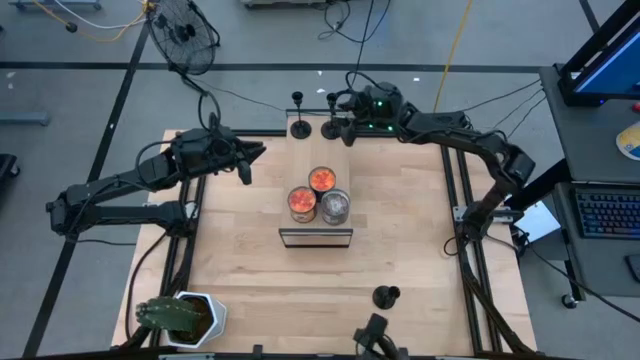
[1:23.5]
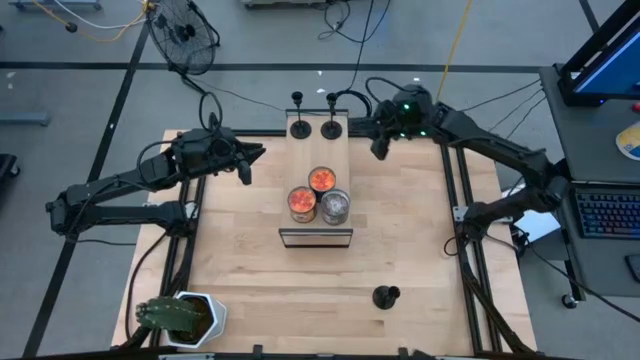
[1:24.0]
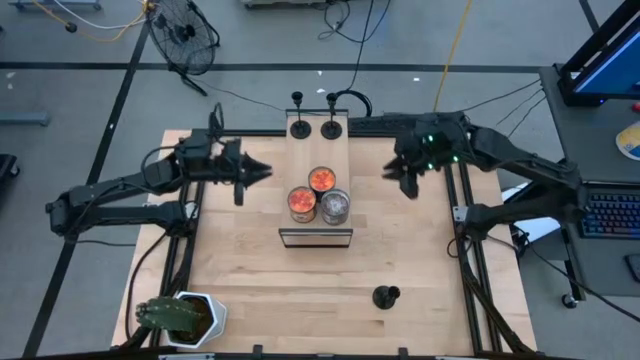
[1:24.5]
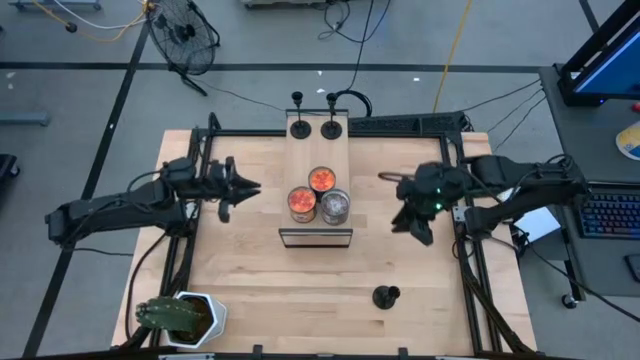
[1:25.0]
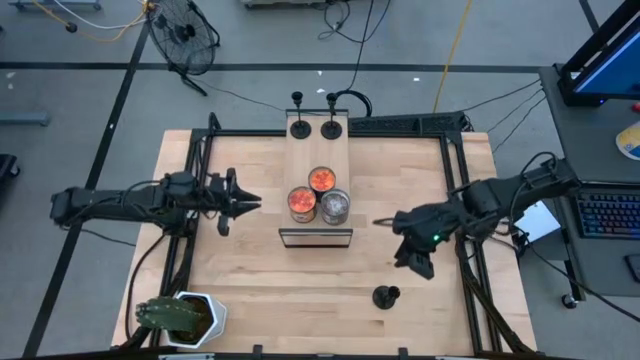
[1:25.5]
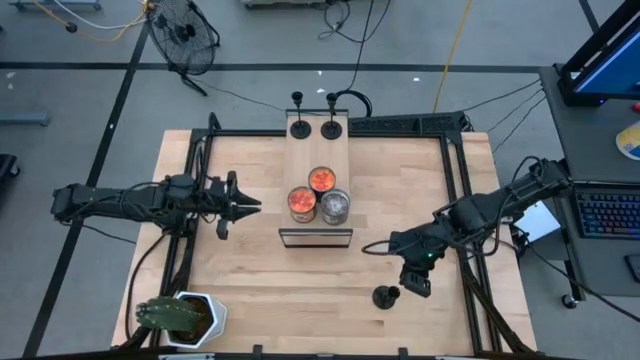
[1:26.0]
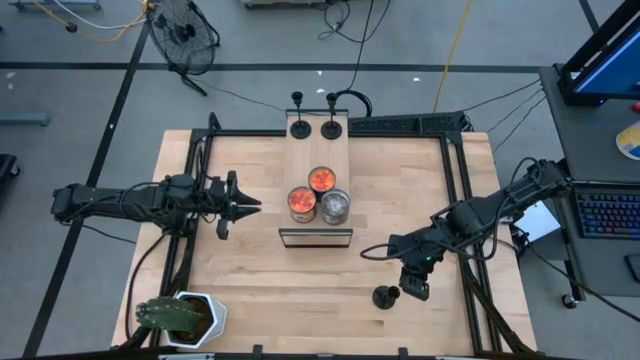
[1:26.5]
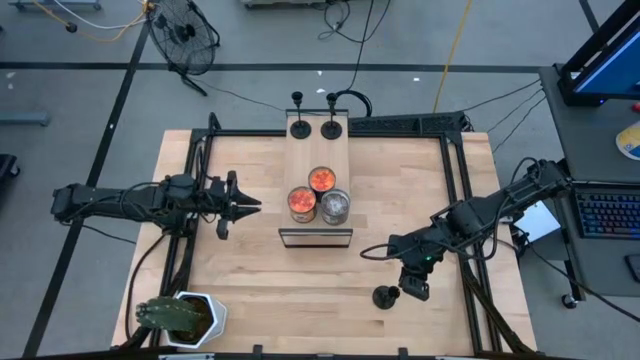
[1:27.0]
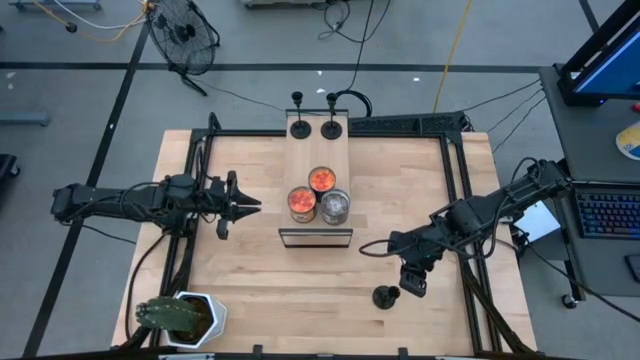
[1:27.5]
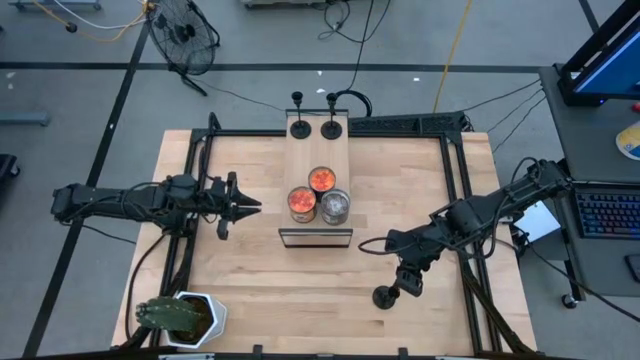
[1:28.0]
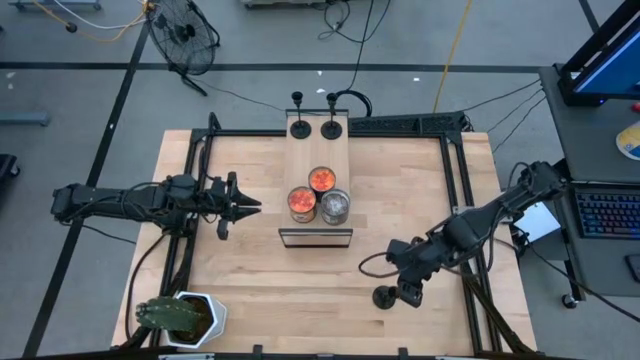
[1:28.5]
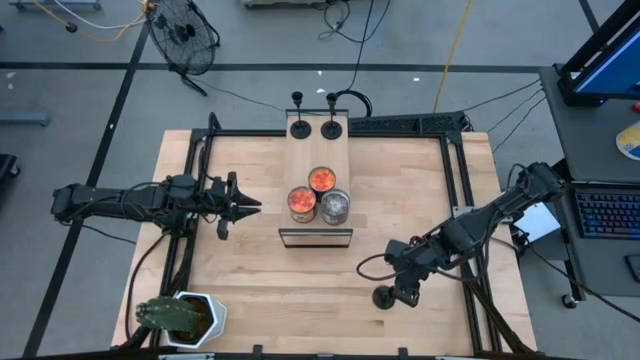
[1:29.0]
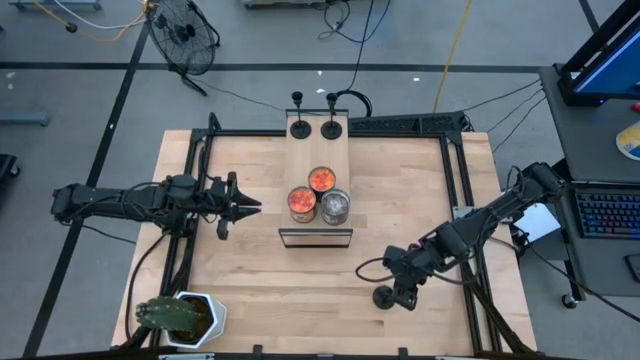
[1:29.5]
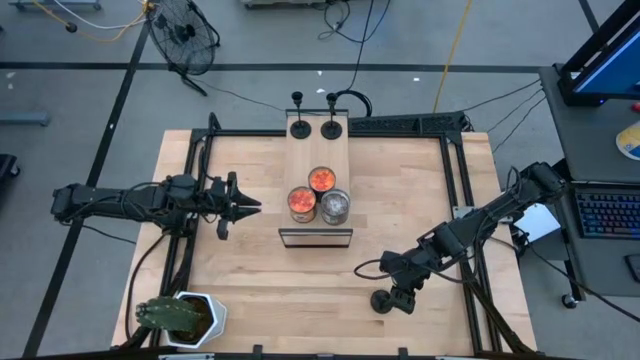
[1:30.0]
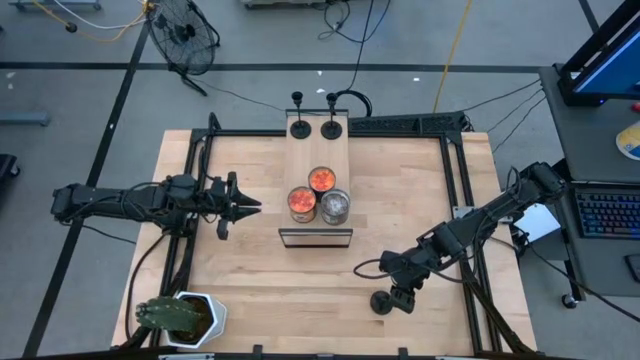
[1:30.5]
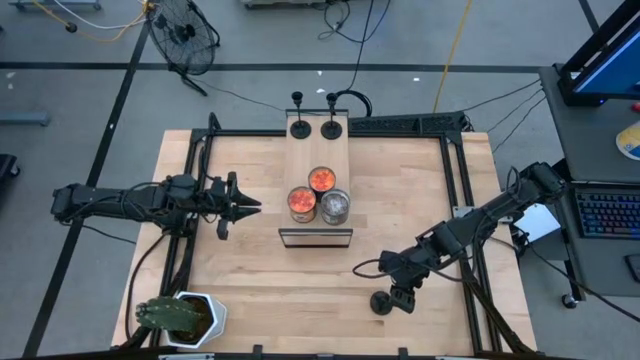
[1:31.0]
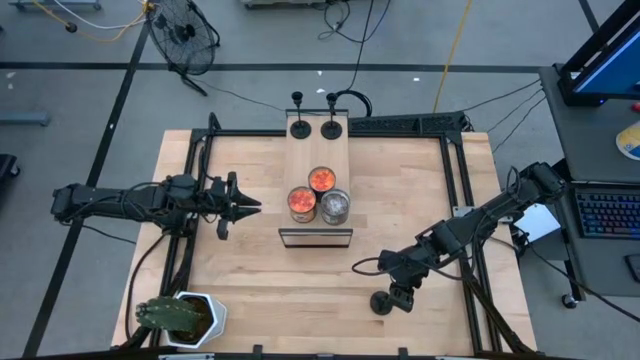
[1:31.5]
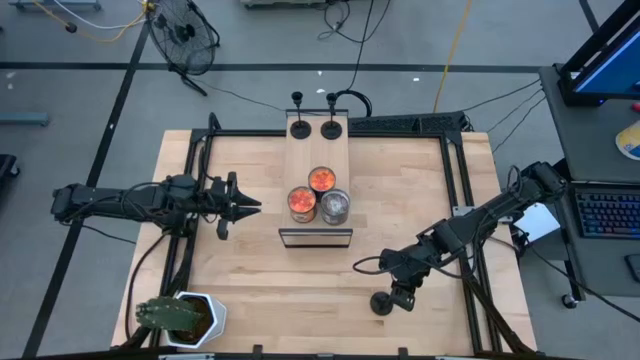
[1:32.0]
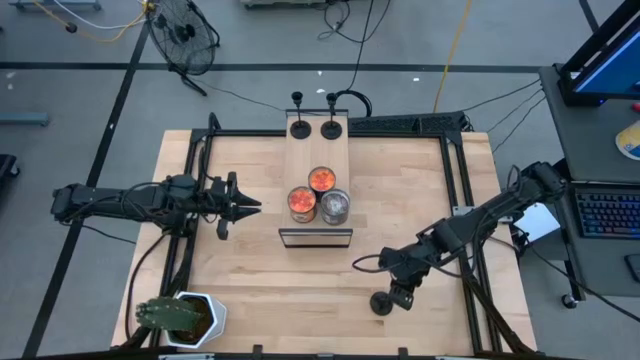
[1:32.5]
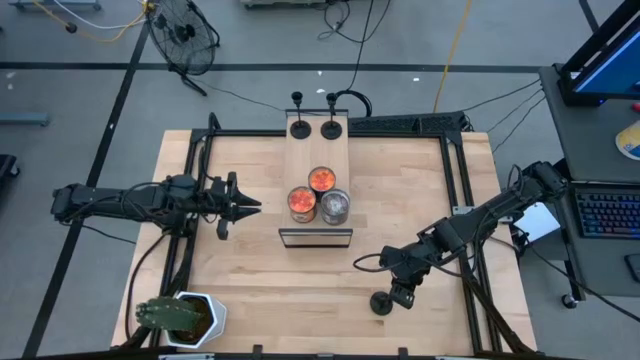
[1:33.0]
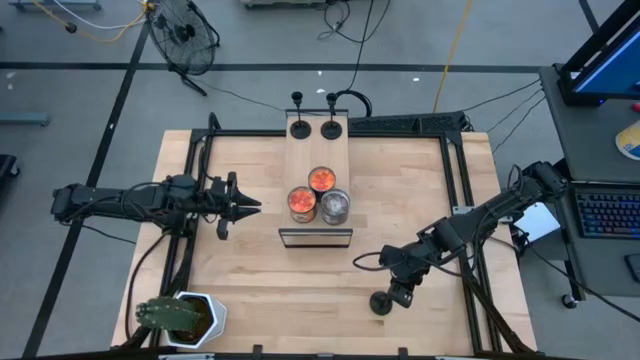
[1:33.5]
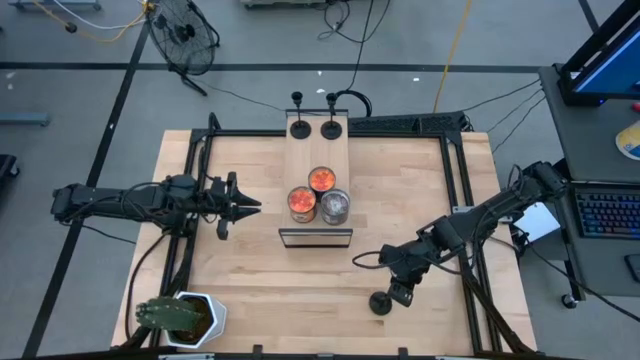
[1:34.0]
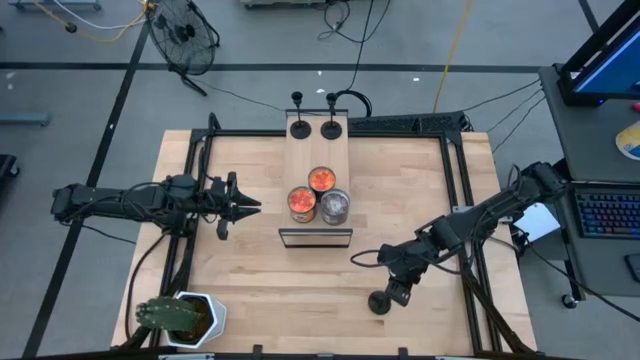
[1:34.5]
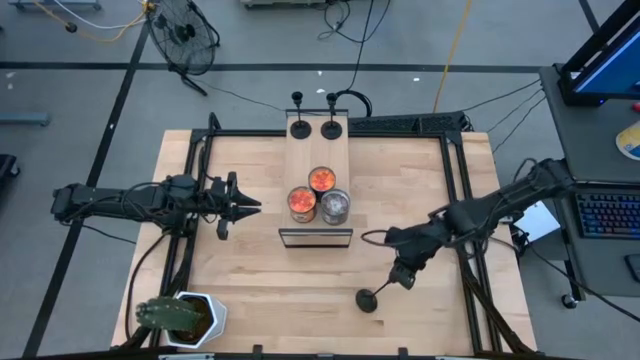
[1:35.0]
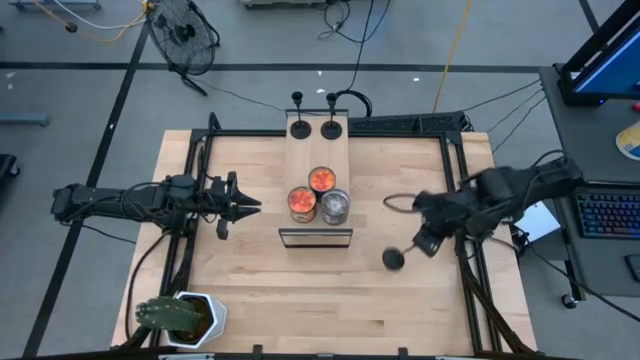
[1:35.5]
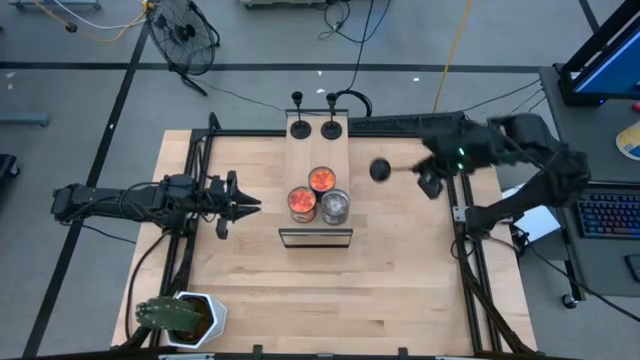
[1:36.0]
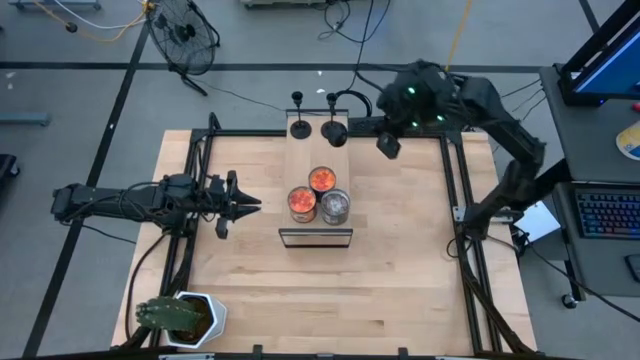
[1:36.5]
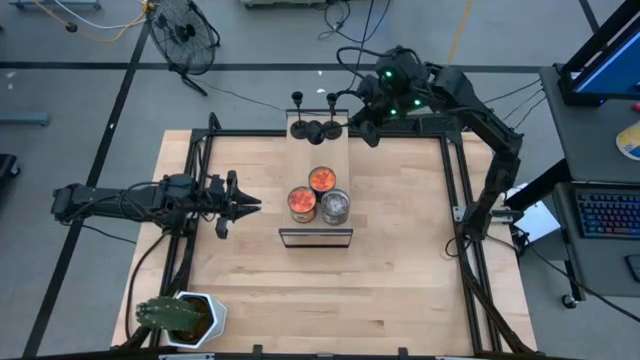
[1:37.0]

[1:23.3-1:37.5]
Task: Pick & Place candle stick holders
Put the black candle holder on the shelf

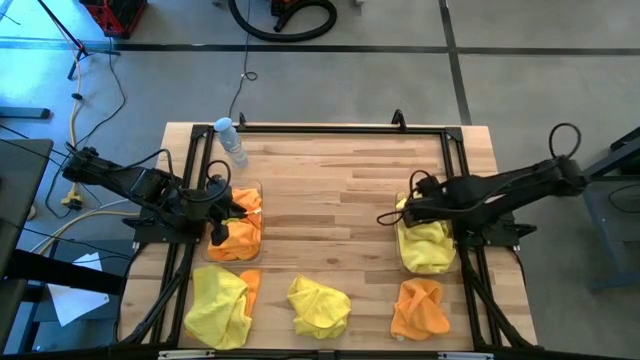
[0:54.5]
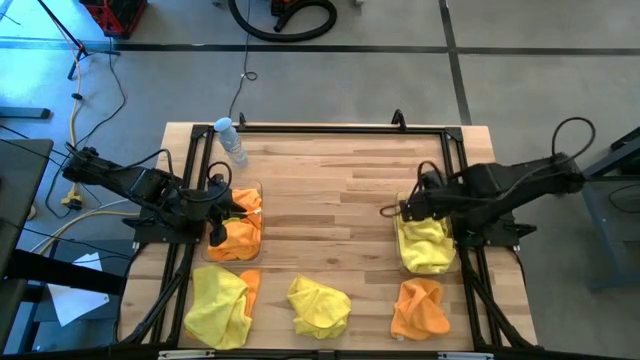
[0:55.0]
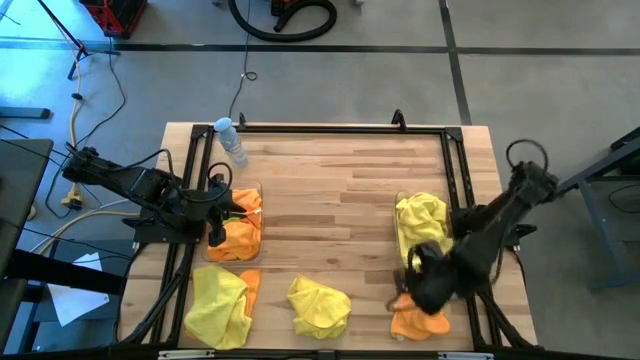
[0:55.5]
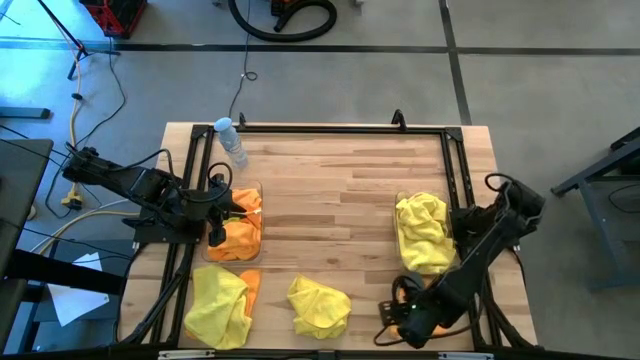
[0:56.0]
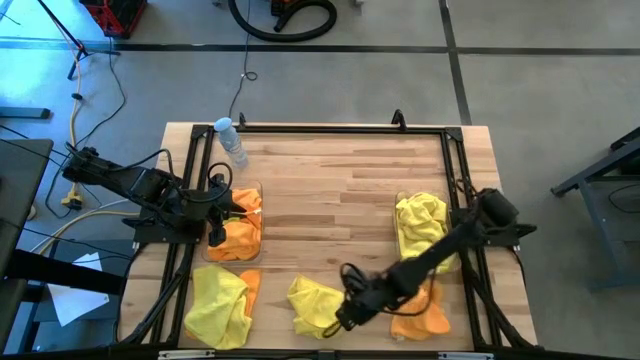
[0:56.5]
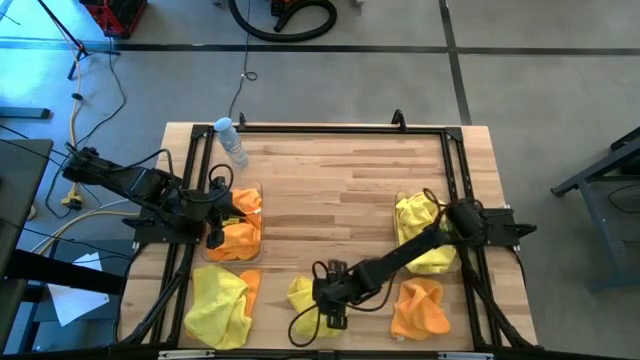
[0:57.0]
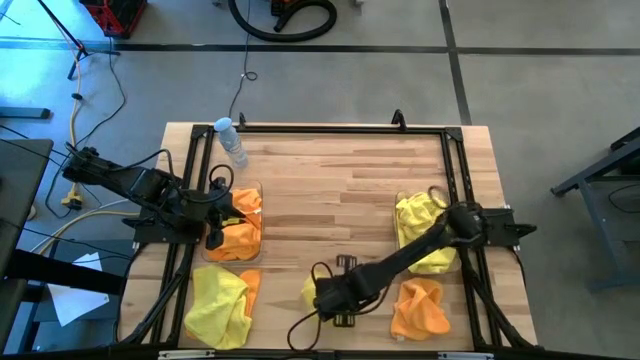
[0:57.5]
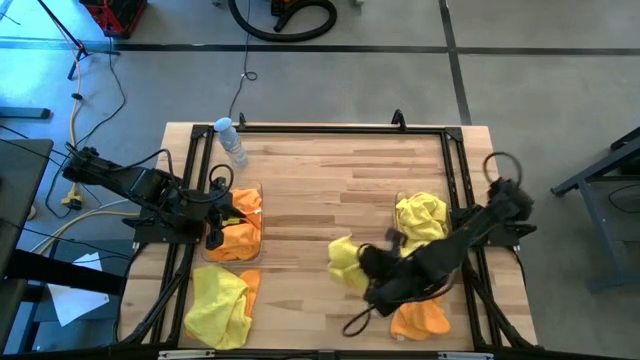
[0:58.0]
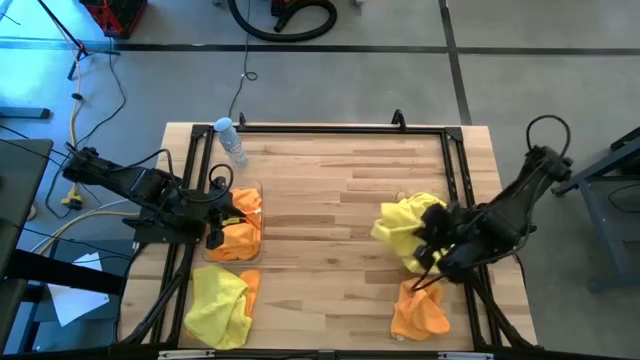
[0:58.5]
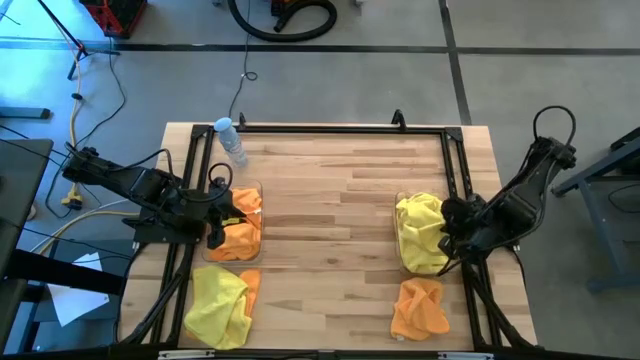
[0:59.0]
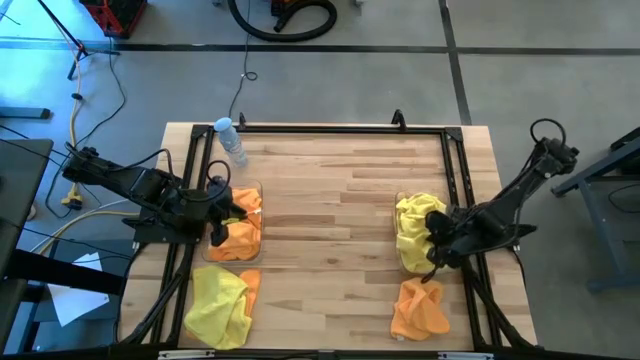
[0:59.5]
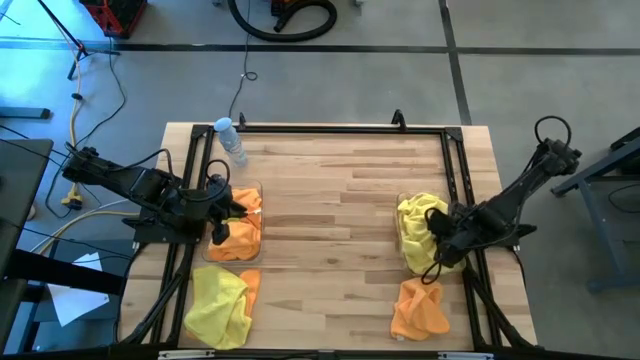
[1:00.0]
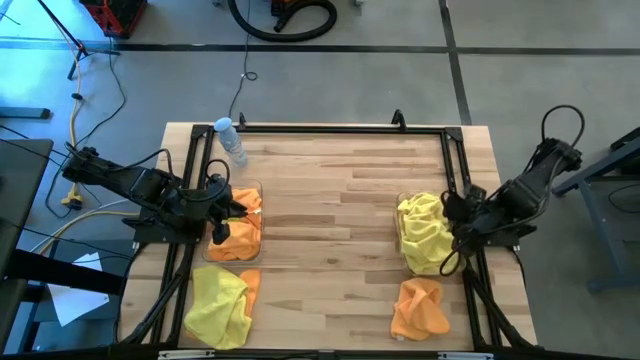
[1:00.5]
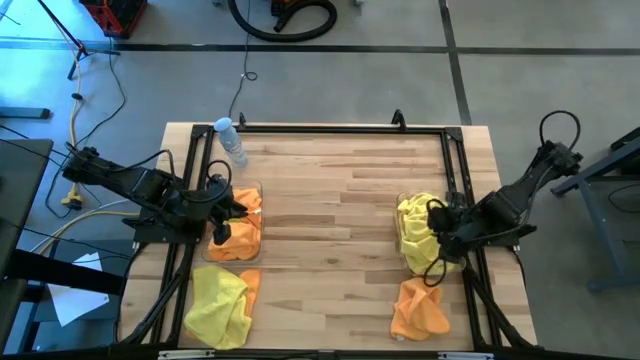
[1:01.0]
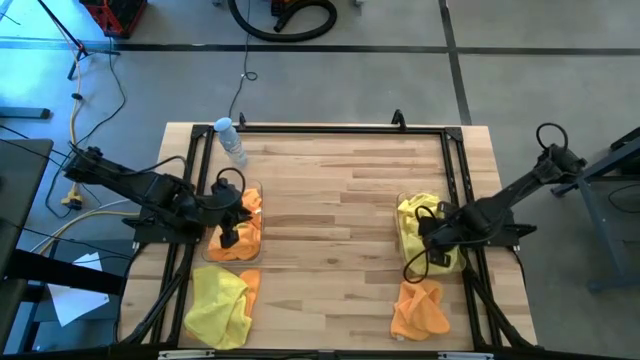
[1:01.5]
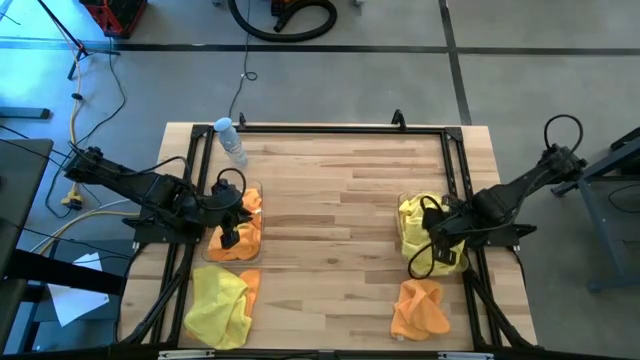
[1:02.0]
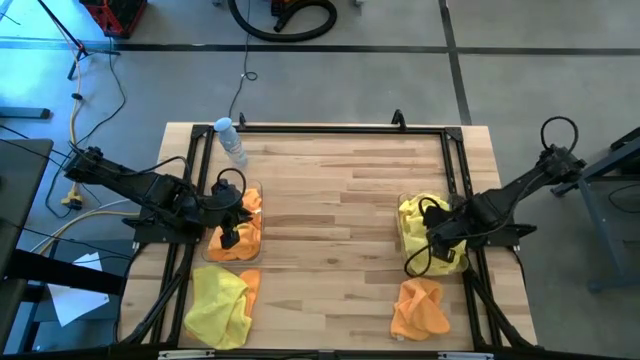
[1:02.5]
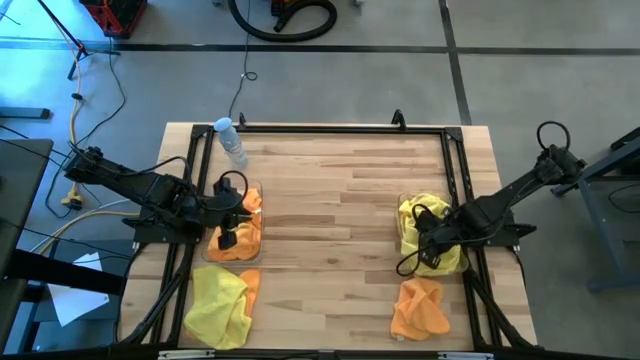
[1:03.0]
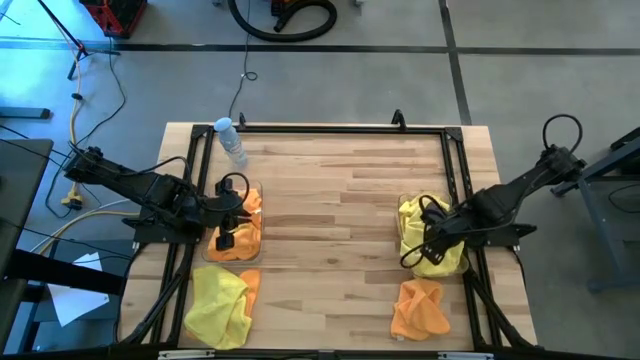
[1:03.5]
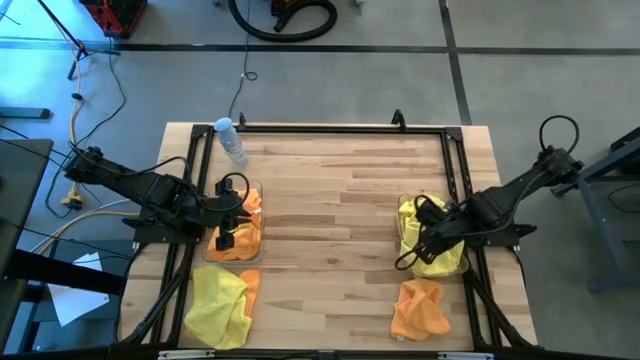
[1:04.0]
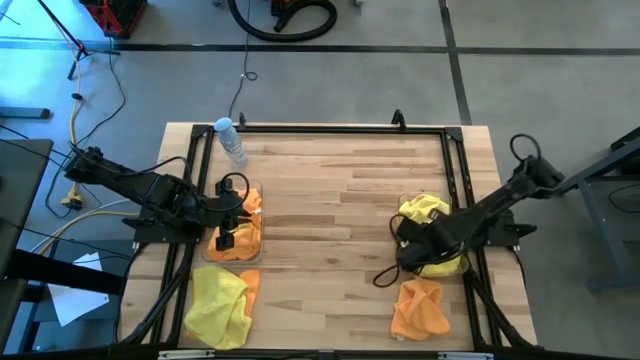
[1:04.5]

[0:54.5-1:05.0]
Task: Sort microfiber towel by color & place in baskets
Put the yellow towel into the right transparent bin
